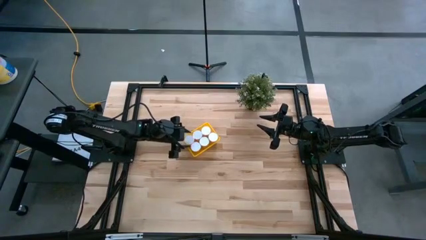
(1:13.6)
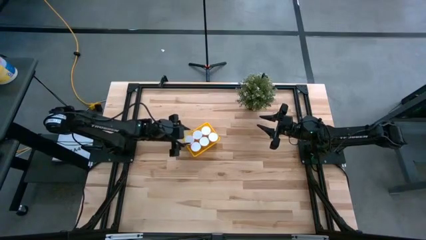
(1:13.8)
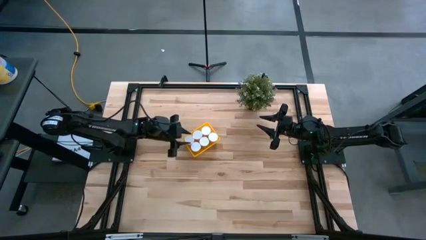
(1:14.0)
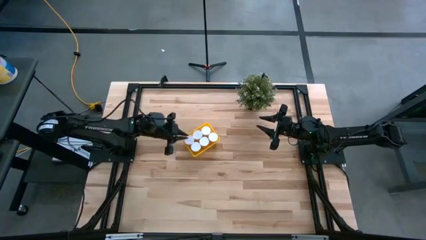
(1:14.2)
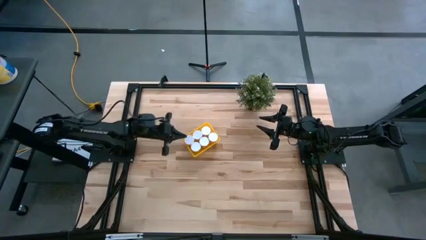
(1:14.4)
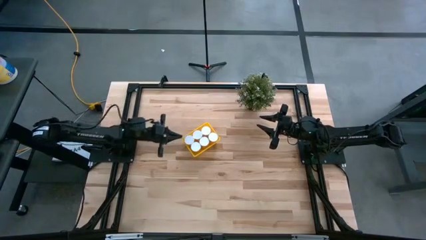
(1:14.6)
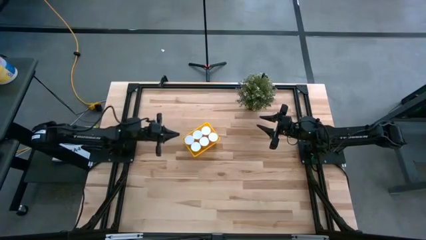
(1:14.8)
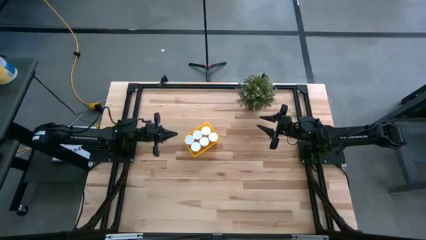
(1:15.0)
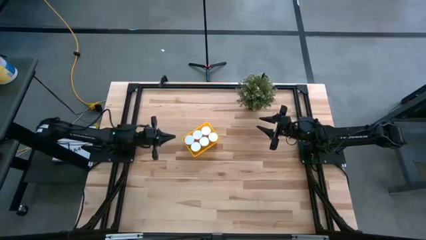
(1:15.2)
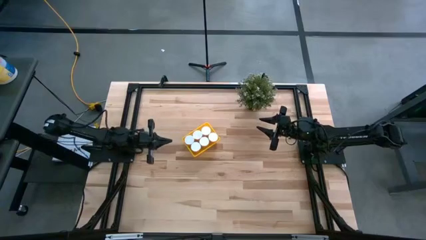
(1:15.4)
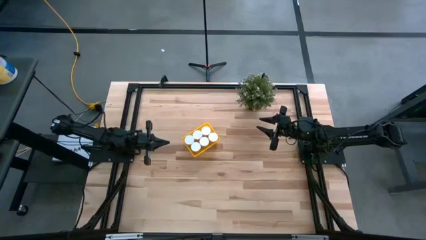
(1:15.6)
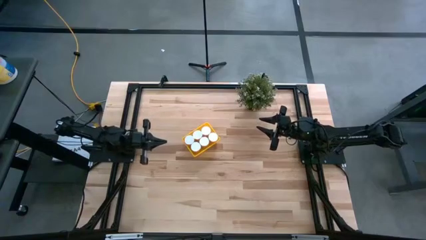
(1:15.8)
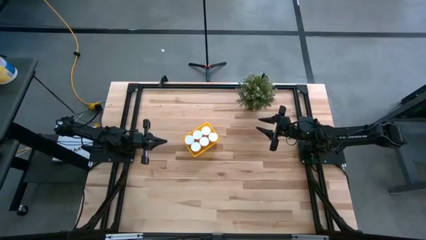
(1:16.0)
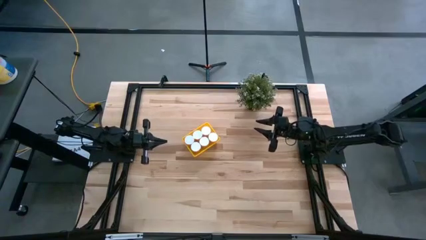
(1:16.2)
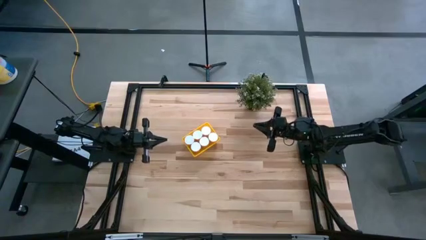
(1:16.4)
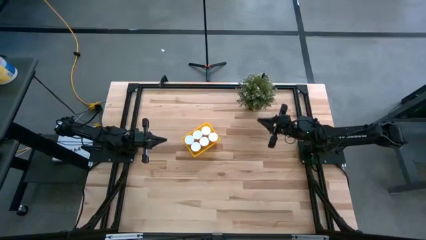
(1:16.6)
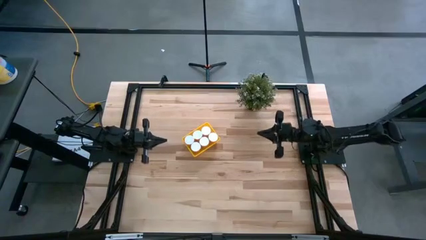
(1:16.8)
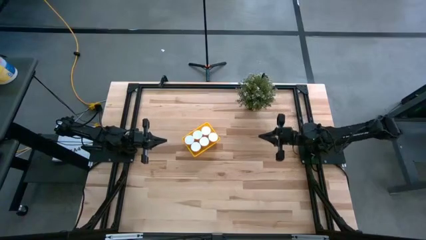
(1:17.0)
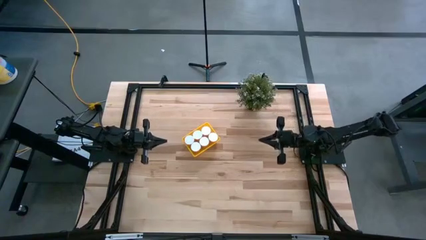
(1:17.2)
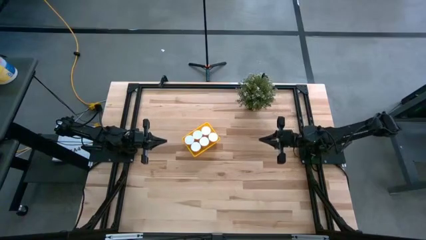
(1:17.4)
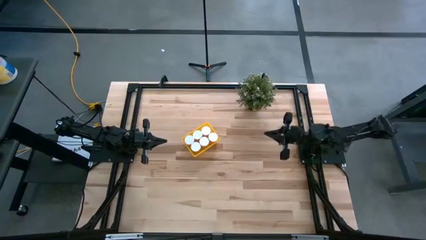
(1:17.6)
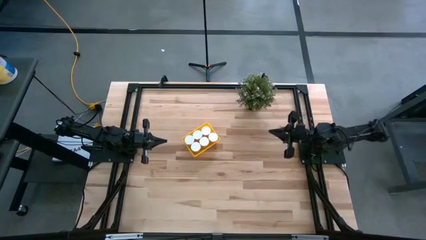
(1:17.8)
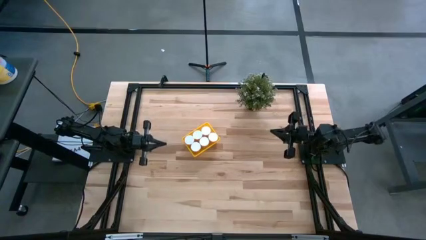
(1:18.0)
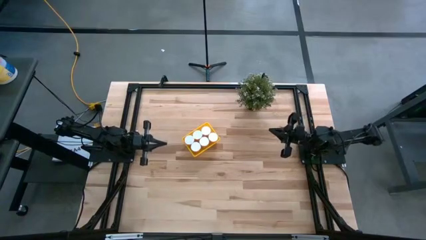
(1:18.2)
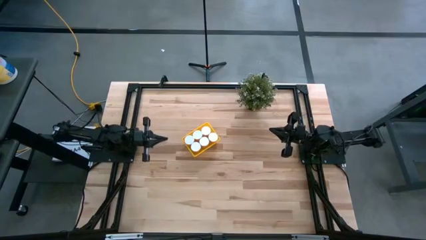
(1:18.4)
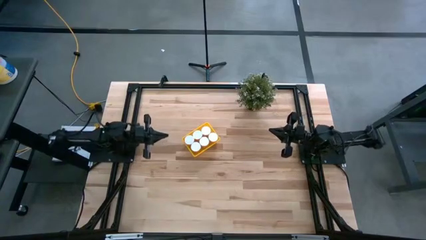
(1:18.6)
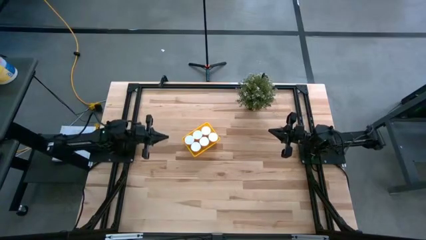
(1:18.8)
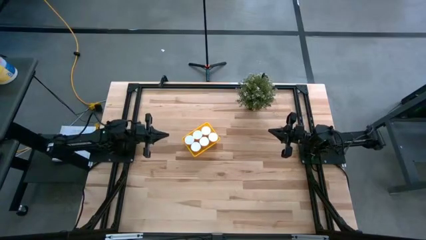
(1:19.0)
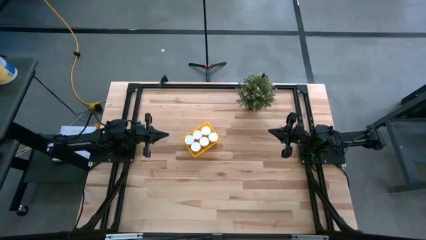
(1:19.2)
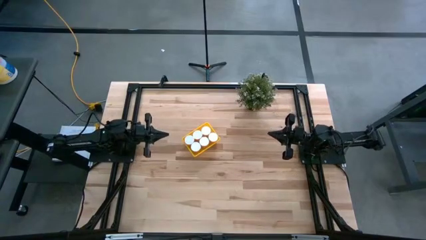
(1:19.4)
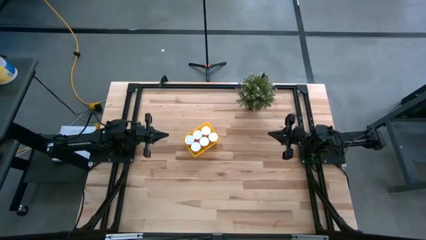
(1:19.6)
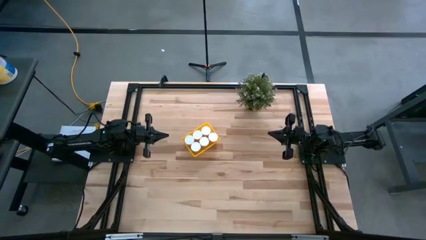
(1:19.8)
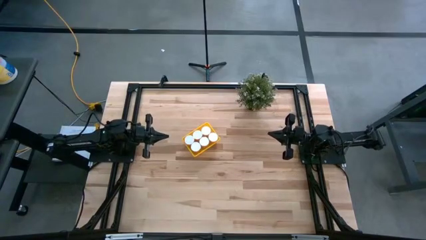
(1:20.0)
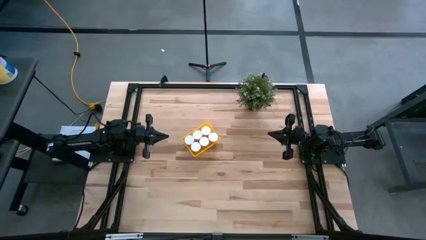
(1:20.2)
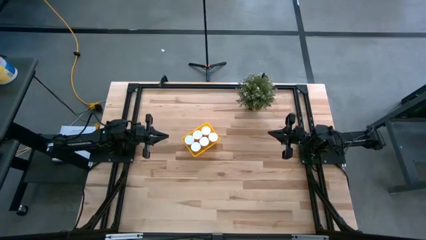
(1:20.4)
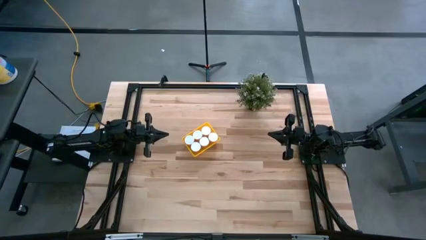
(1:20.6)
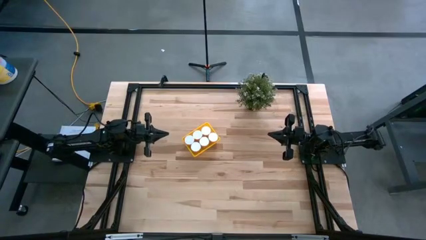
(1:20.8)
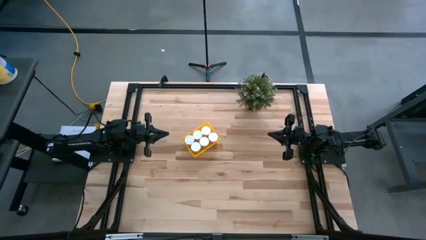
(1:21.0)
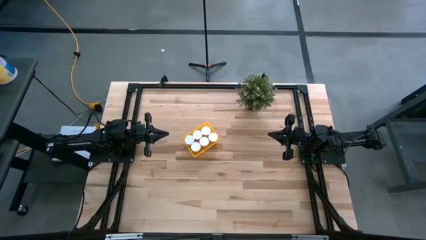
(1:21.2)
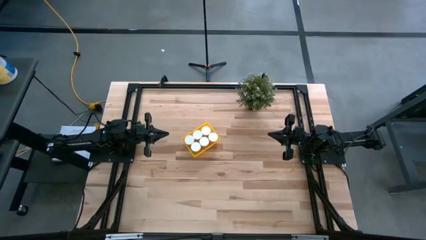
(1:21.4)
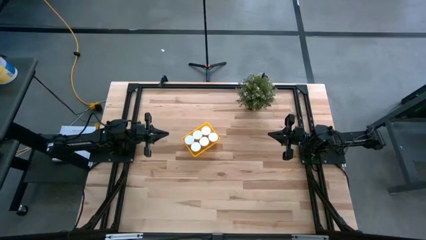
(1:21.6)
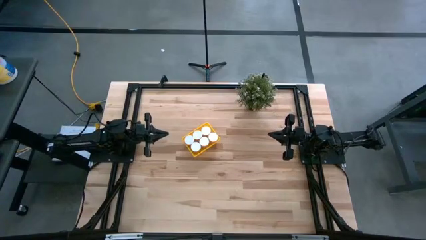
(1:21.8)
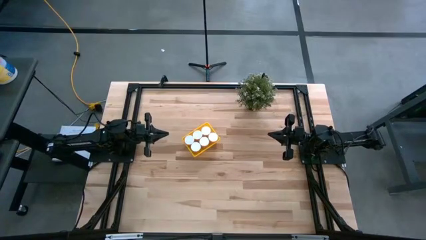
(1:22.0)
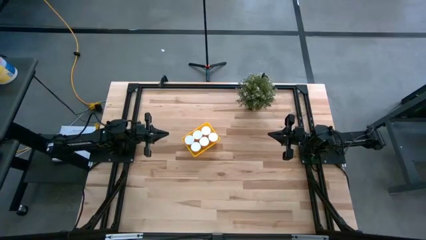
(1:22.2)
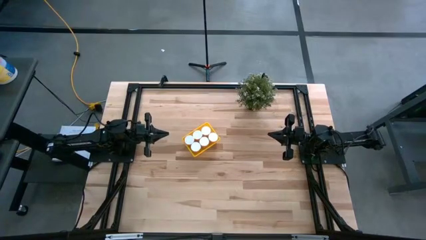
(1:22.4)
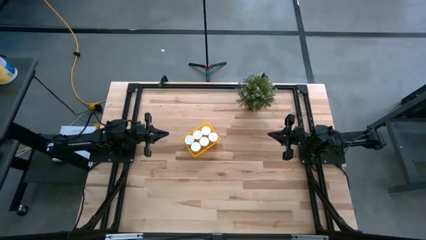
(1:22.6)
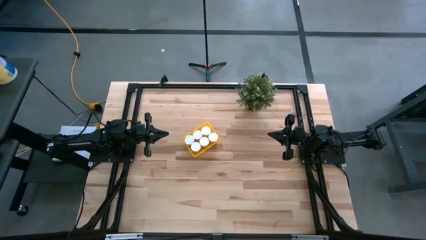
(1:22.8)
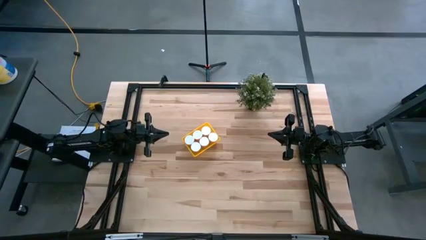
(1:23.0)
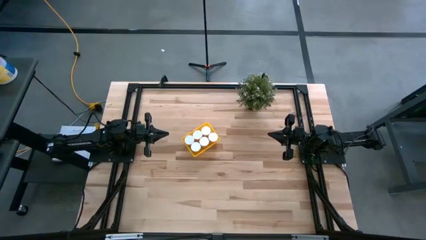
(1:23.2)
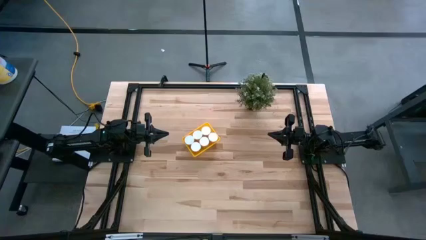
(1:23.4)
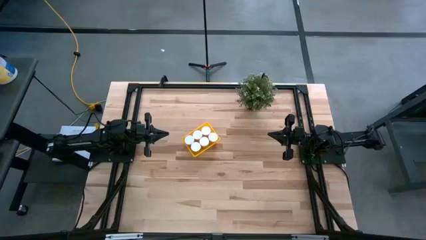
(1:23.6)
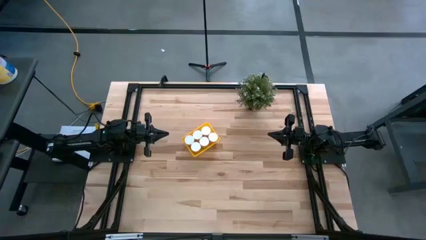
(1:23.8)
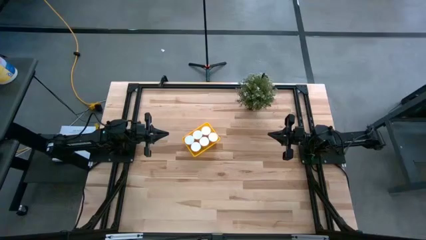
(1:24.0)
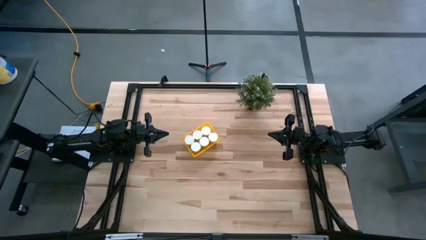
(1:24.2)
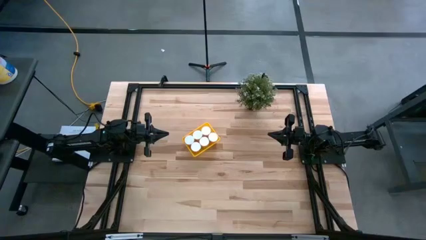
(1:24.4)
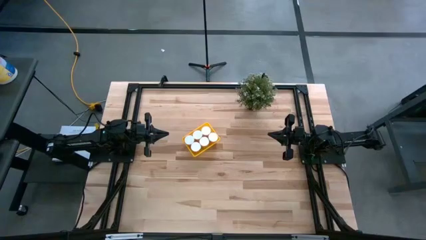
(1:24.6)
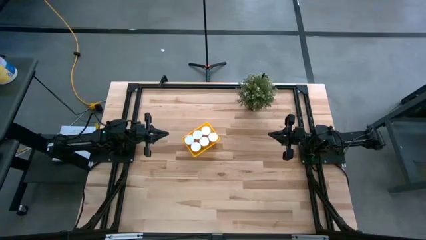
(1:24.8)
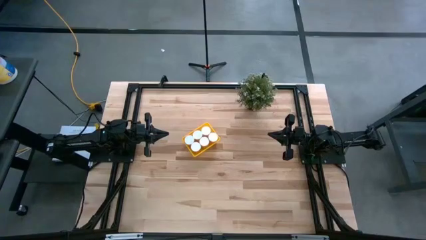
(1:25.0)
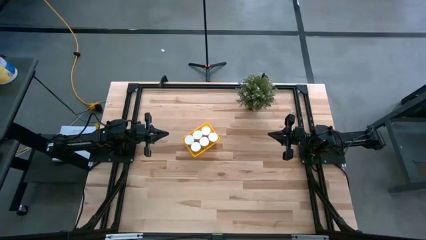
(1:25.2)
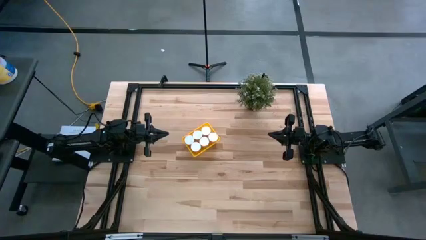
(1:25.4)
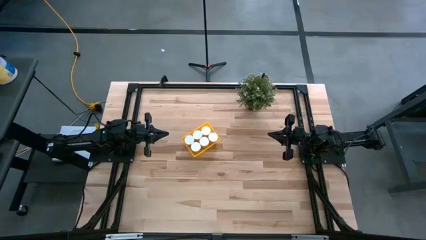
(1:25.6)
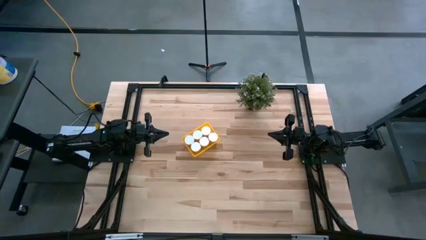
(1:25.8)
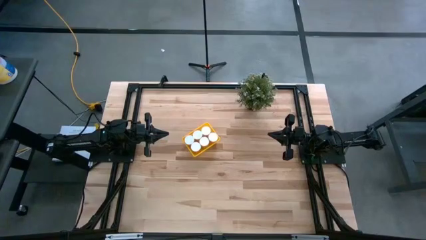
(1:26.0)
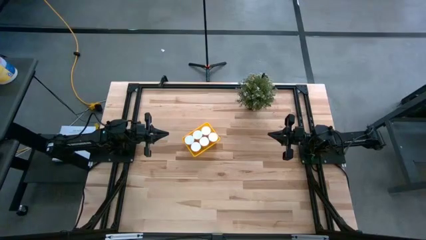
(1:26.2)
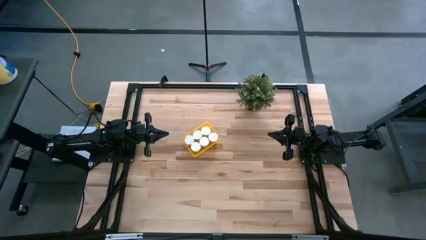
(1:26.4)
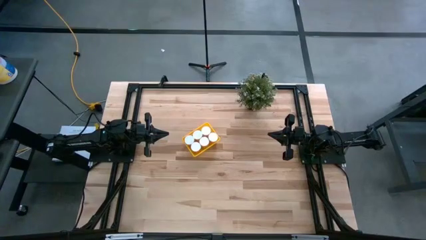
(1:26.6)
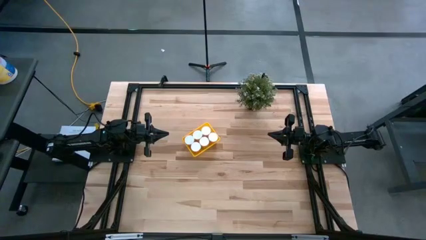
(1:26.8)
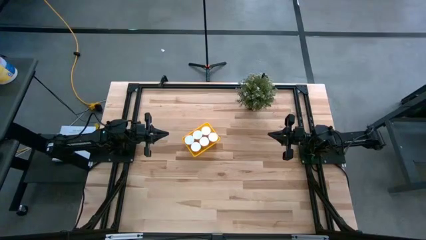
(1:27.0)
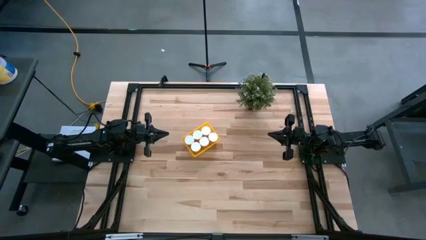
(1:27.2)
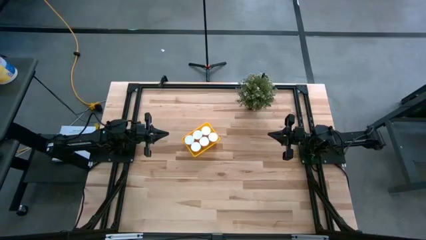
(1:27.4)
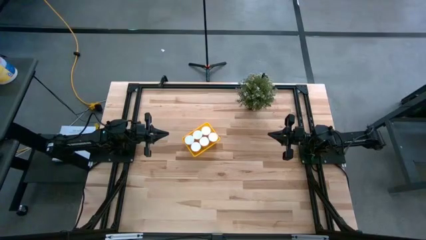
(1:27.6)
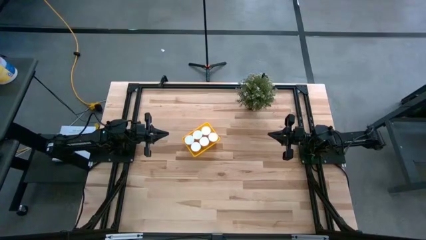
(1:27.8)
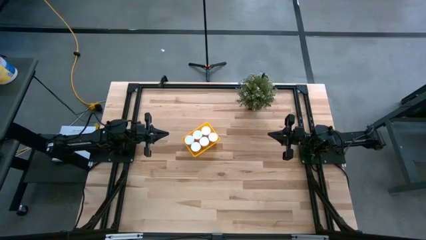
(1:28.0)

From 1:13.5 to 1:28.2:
Task: Pick and place pill bottles into a basket
Return to Home Position
